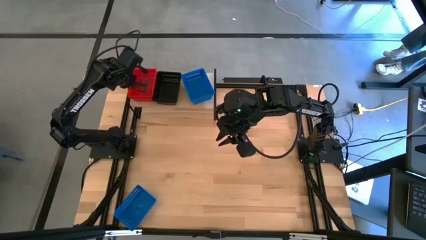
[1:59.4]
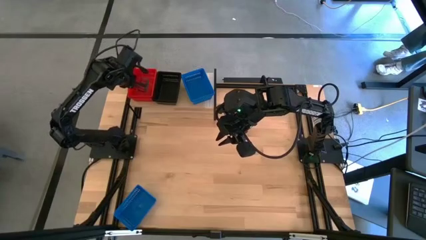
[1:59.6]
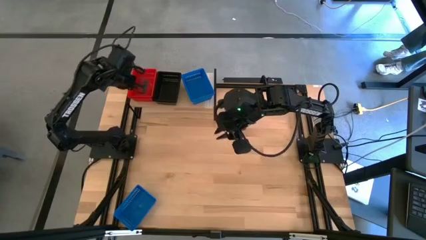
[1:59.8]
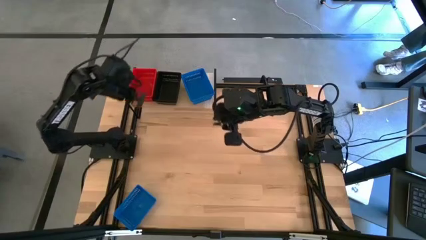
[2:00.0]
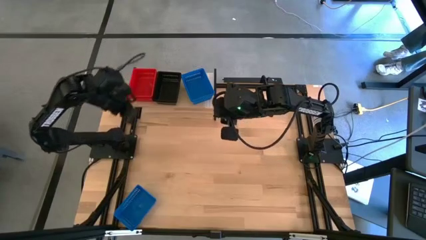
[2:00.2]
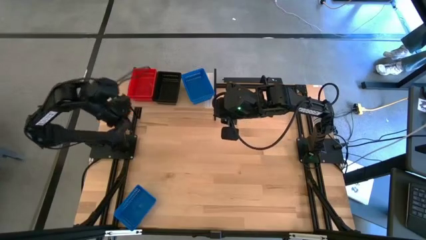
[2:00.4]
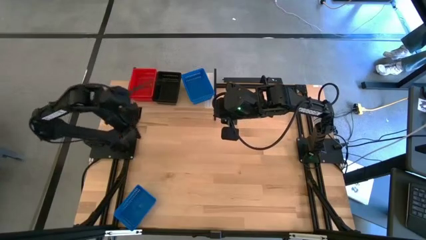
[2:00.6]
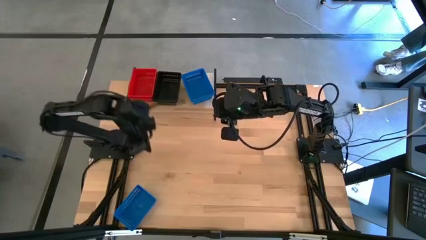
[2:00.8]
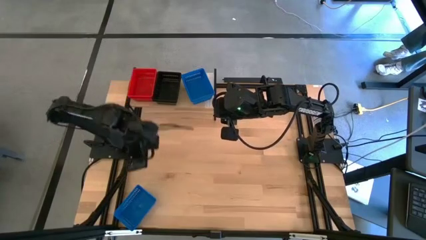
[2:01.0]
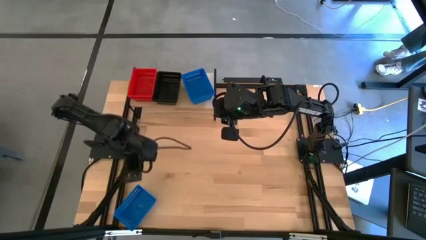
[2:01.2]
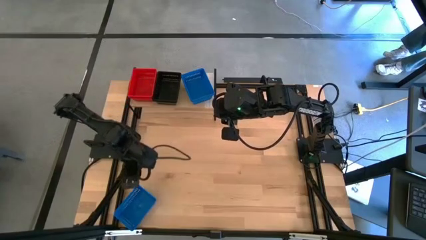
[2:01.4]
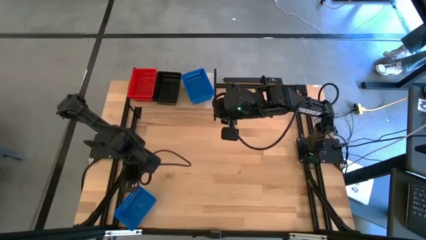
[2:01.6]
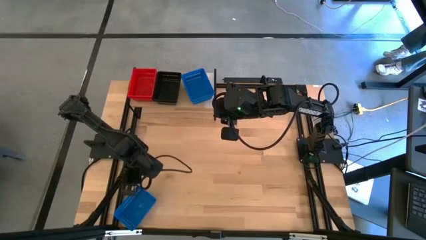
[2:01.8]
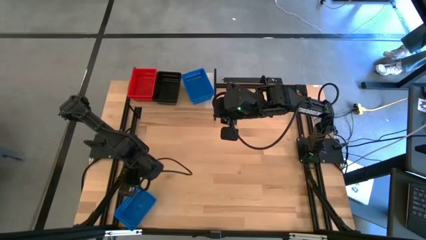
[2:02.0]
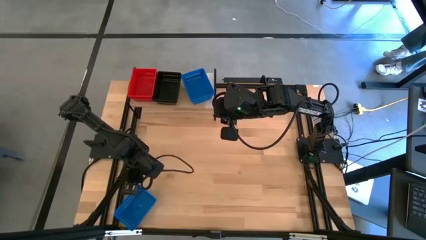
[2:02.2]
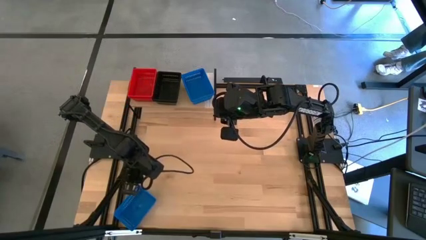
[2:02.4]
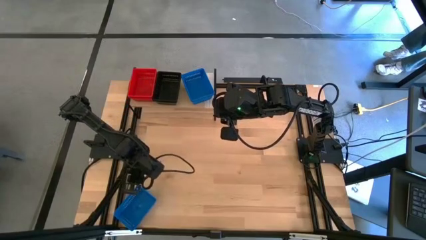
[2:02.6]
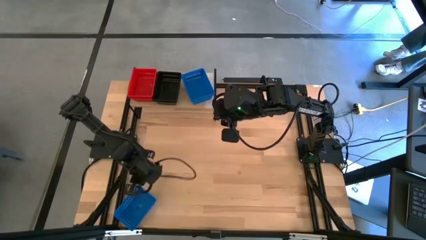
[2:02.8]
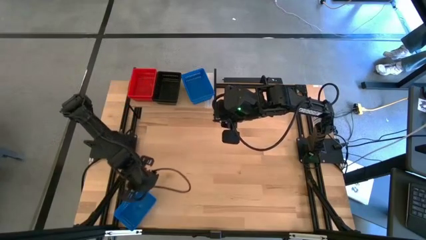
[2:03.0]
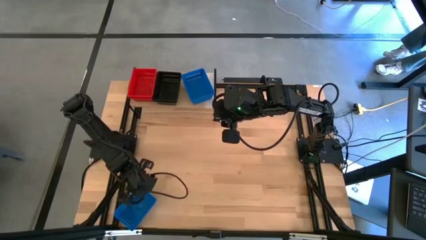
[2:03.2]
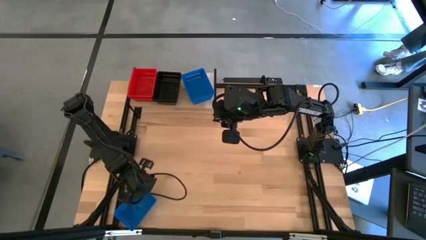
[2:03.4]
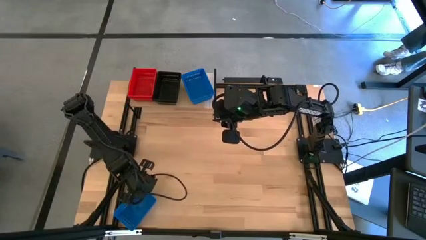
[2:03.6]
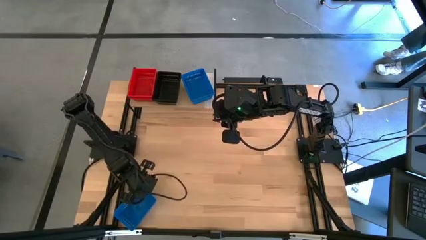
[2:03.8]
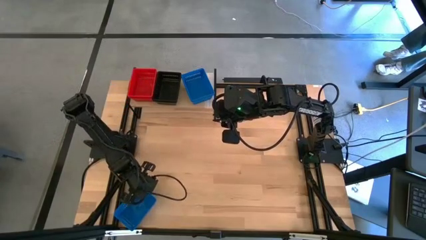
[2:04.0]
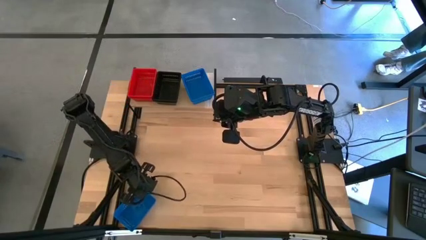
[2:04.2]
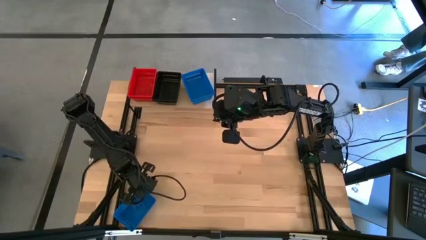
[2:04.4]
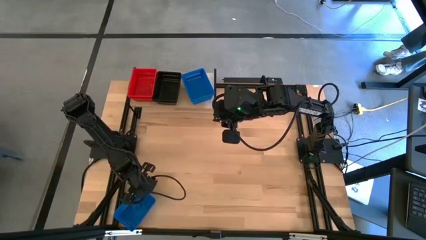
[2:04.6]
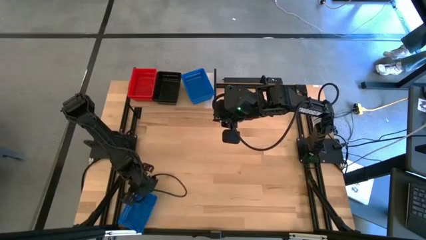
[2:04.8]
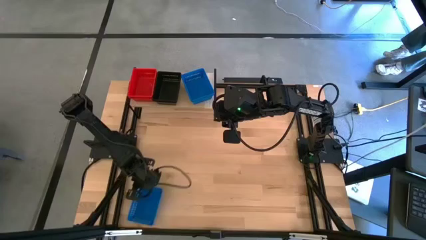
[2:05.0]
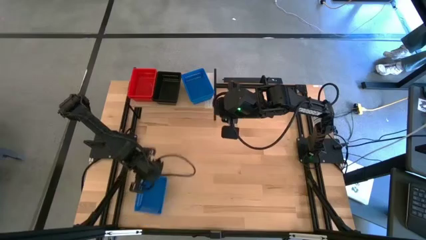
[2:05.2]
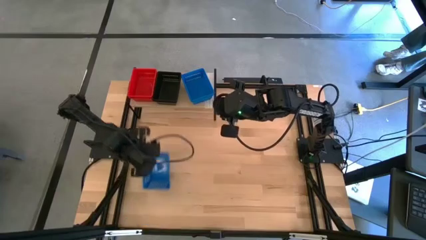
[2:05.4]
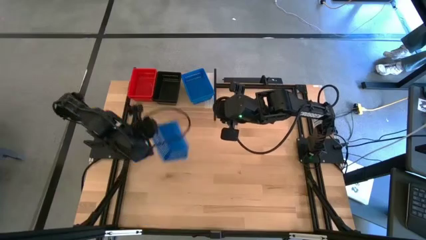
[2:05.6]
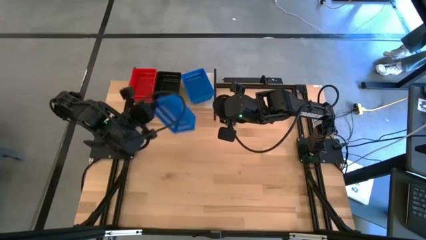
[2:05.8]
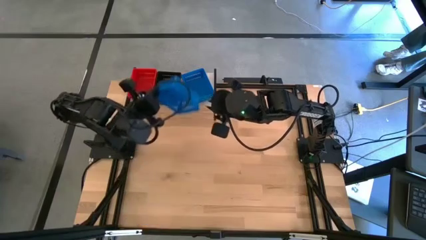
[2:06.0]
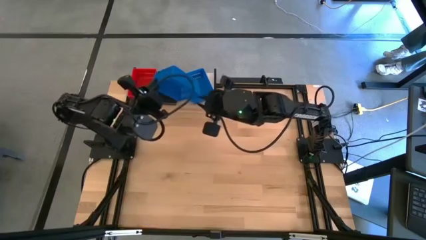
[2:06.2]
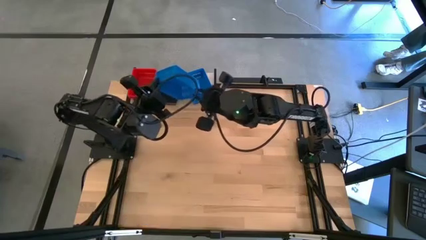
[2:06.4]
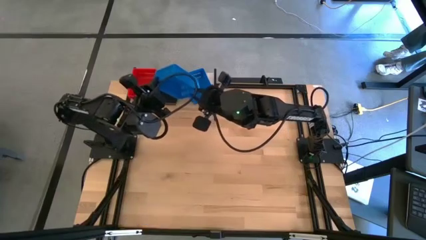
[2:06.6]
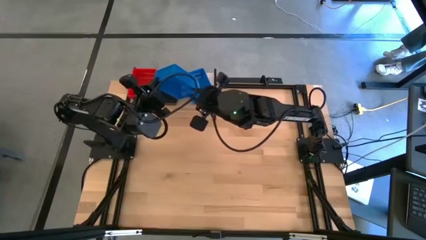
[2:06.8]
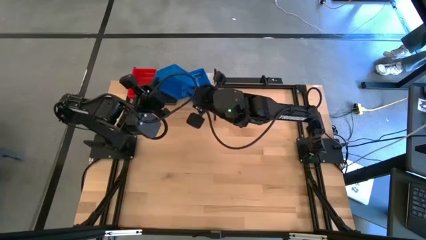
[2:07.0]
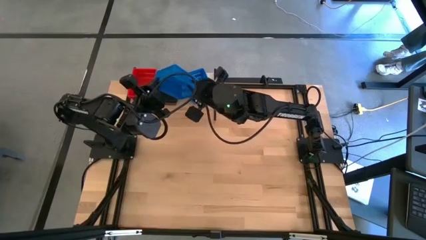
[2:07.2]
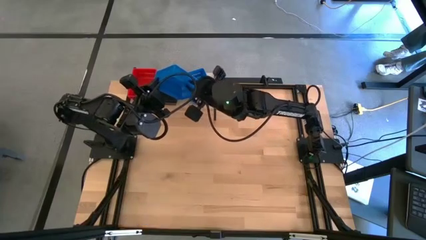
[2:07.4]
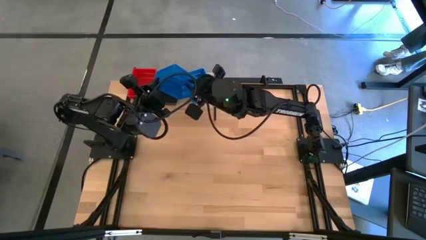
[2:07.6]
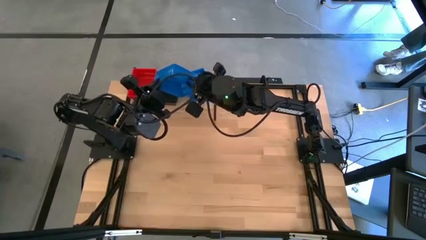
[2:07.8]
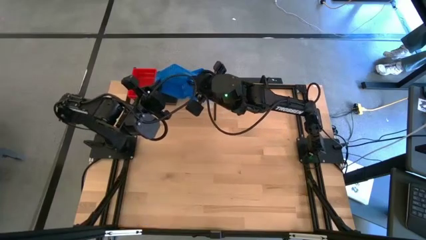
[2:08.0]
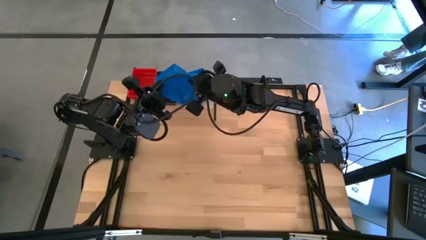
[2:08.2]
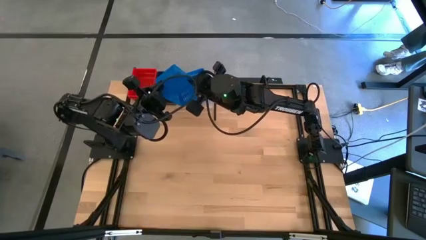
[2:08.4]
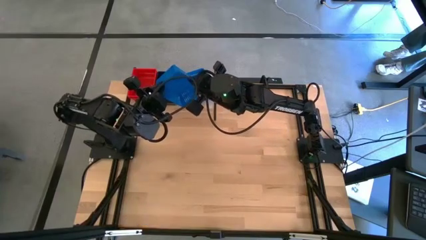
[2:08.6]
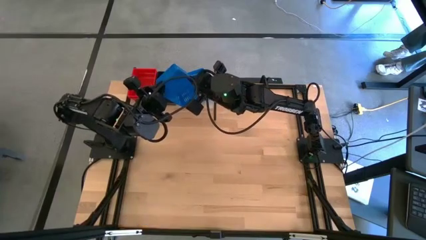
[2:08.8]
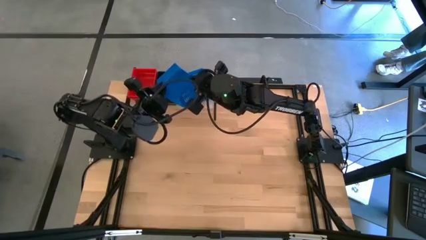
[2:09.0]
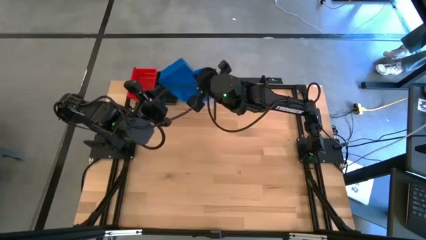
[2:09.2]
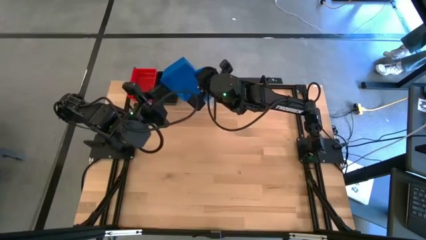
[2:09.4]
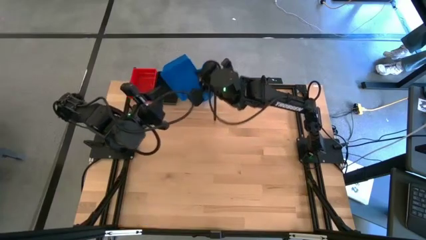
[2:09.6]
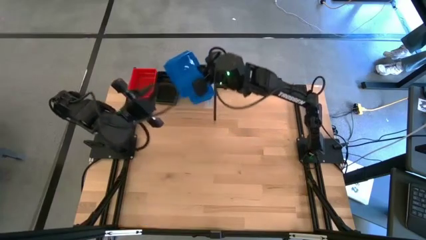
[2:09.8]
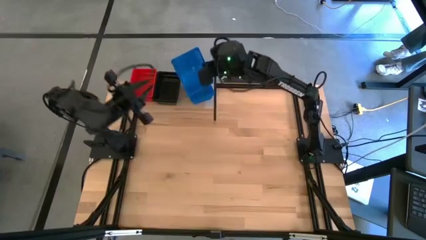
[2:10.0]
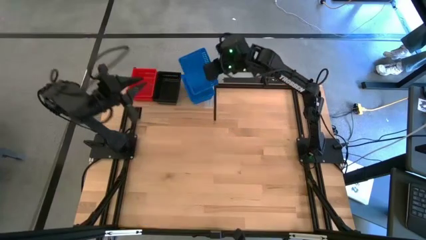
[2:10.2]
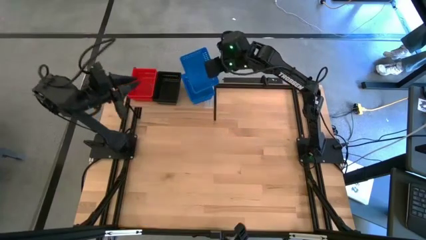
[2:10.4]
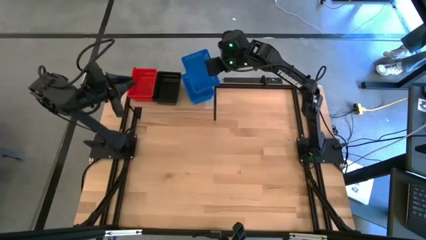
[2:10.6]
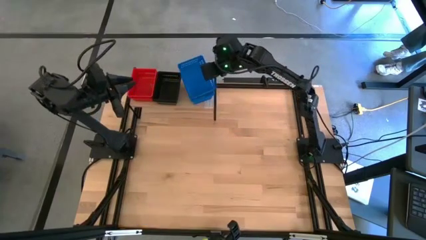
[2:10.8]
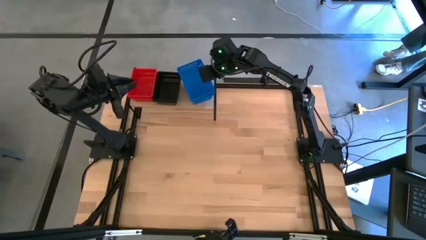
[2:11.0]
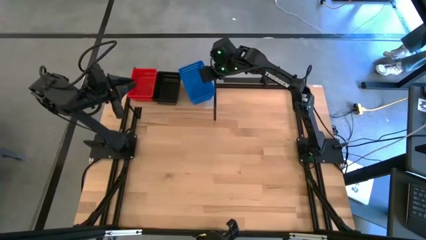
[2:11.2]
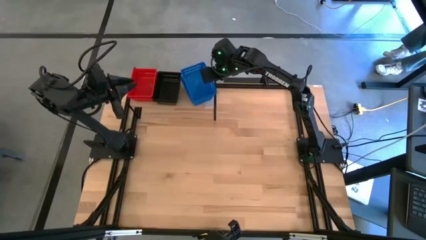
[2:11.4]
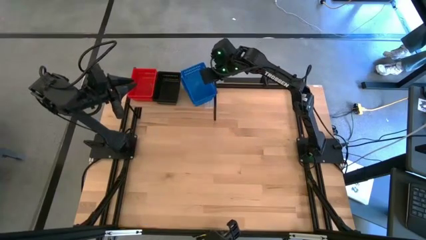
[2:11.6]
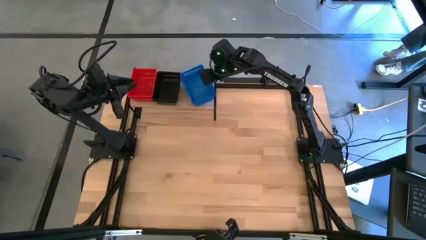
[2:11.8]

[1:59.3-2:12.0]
Task: Stack baskets on shelf by color
Stack the blue bin on the stacked blue bins on the shelf
